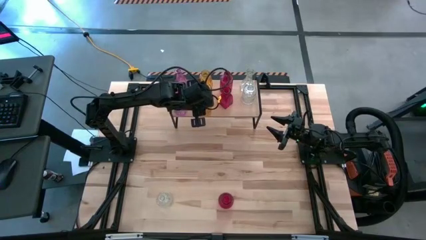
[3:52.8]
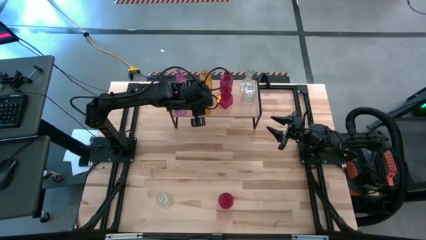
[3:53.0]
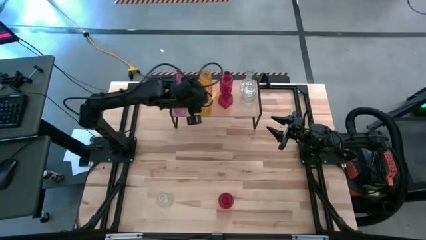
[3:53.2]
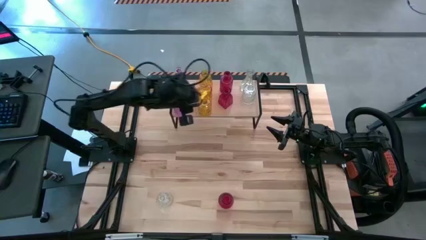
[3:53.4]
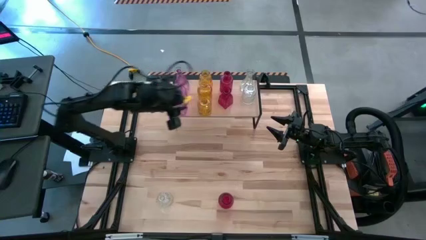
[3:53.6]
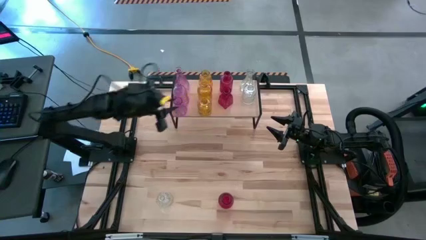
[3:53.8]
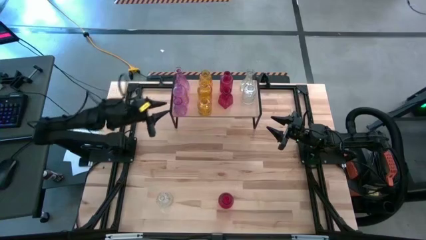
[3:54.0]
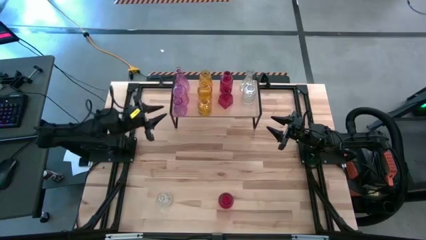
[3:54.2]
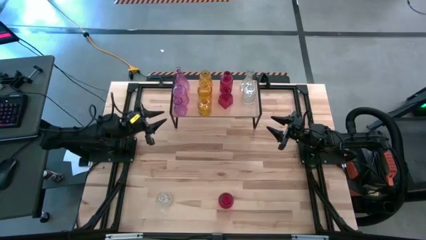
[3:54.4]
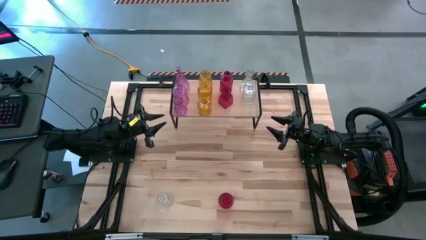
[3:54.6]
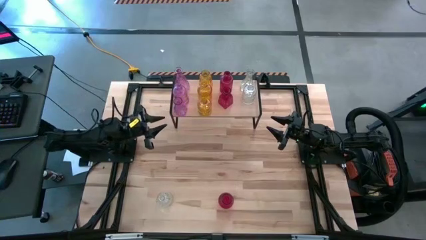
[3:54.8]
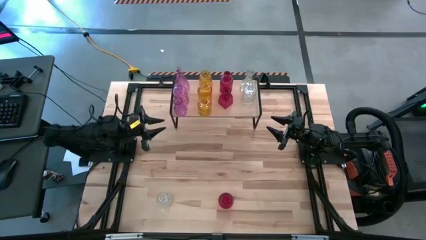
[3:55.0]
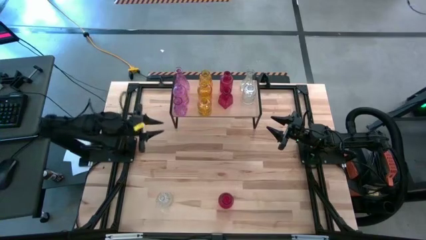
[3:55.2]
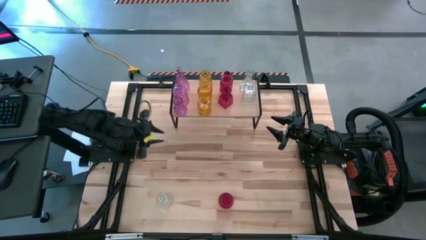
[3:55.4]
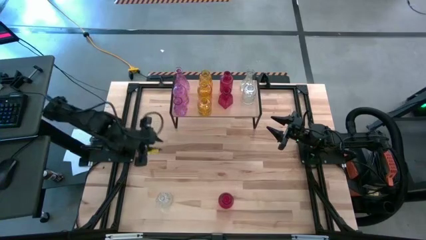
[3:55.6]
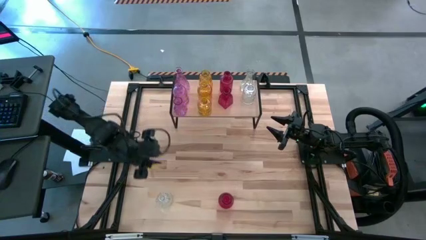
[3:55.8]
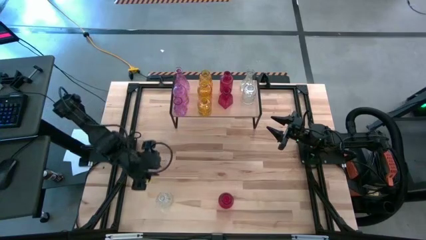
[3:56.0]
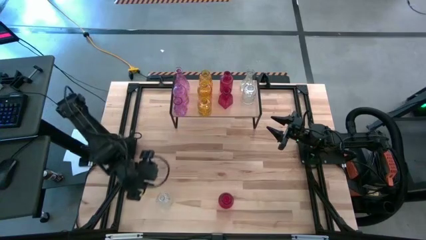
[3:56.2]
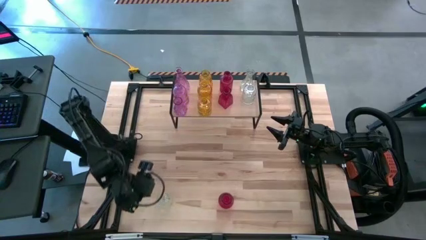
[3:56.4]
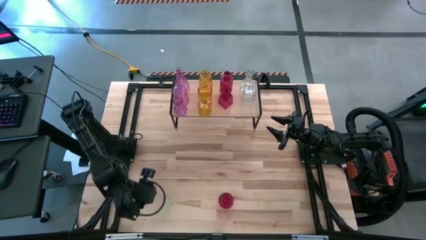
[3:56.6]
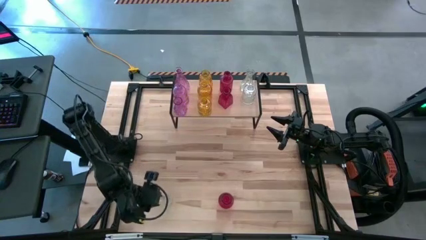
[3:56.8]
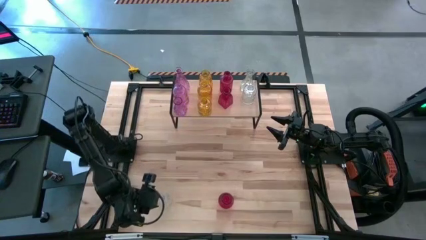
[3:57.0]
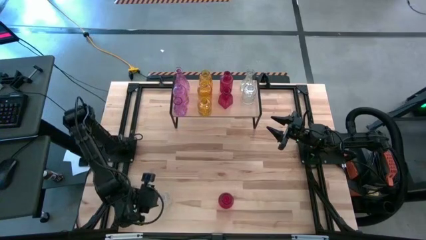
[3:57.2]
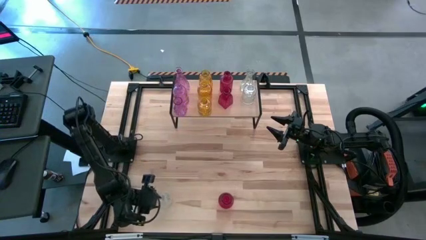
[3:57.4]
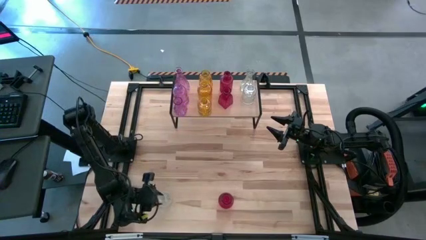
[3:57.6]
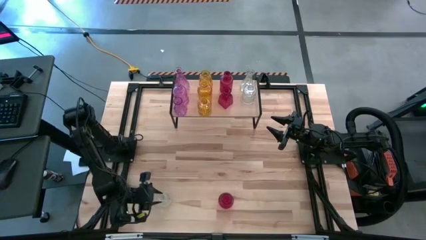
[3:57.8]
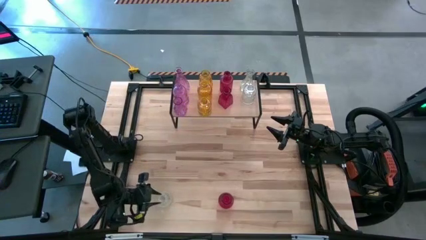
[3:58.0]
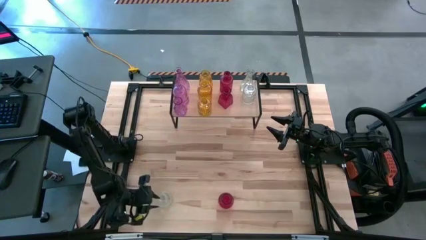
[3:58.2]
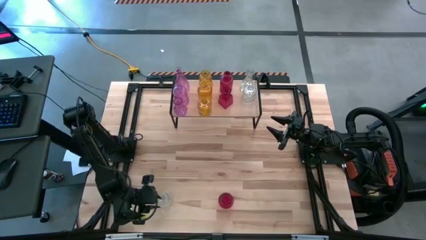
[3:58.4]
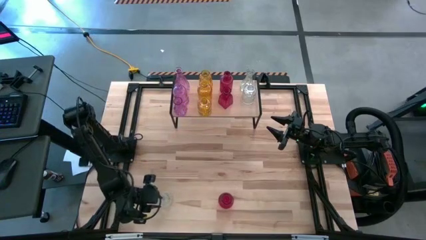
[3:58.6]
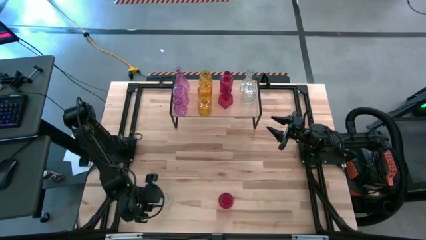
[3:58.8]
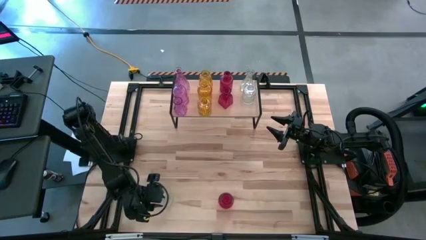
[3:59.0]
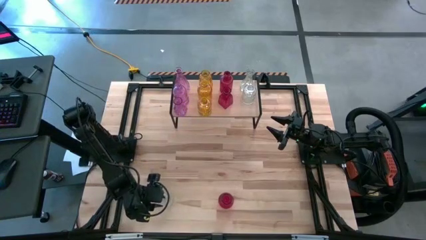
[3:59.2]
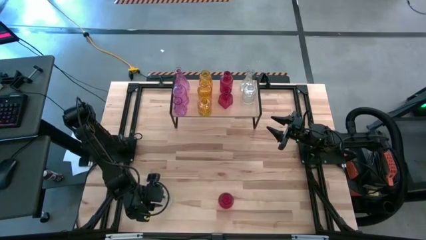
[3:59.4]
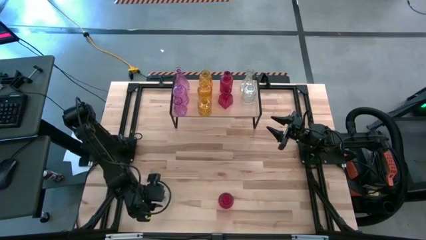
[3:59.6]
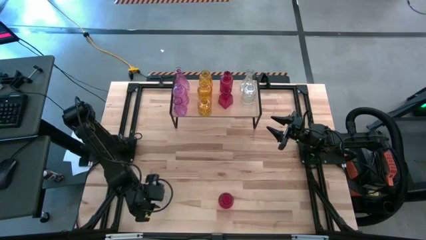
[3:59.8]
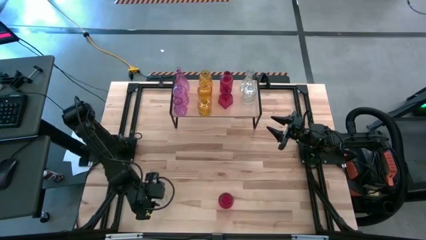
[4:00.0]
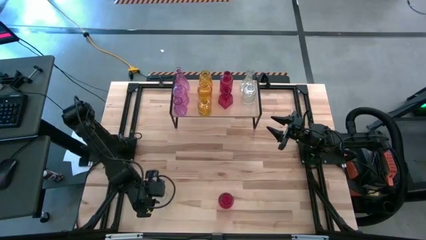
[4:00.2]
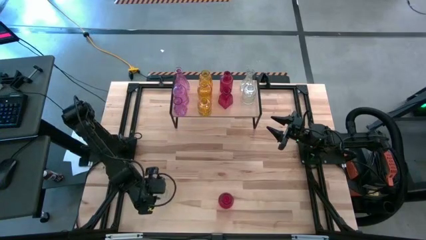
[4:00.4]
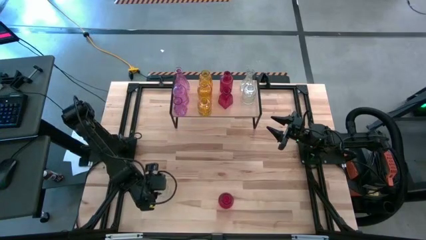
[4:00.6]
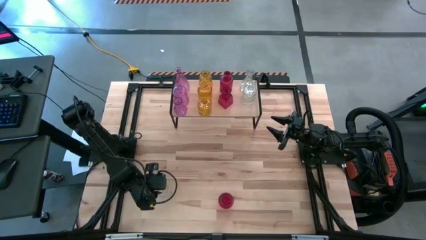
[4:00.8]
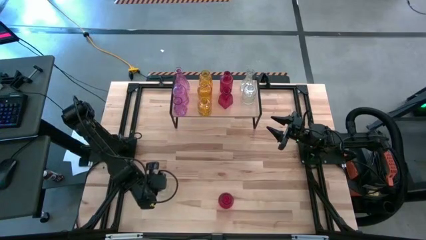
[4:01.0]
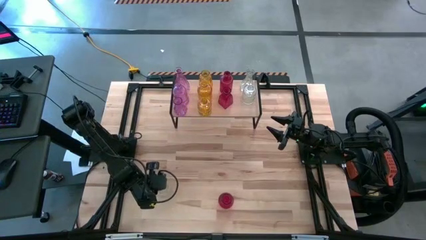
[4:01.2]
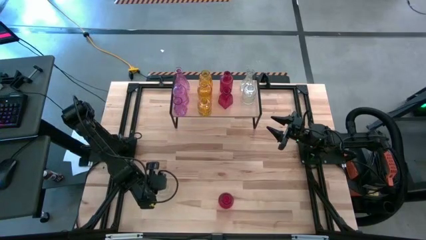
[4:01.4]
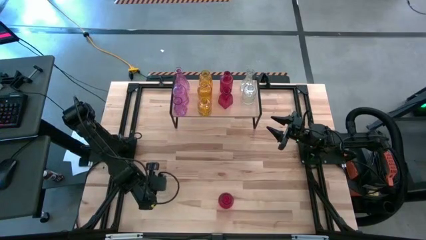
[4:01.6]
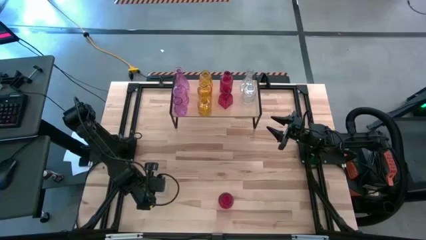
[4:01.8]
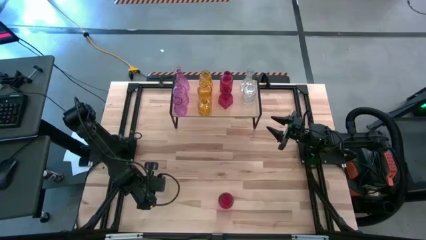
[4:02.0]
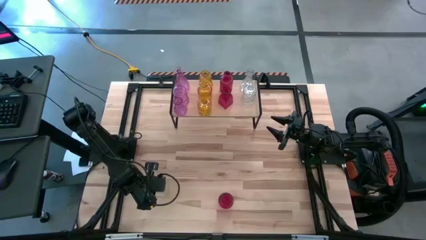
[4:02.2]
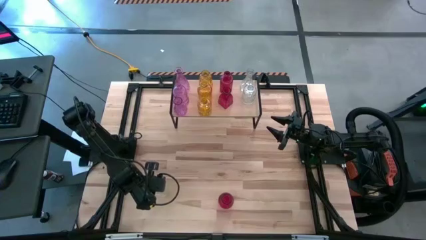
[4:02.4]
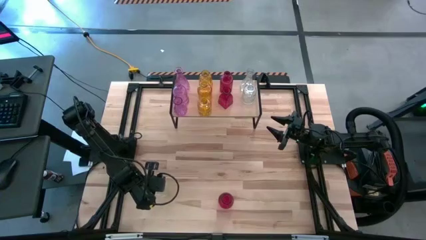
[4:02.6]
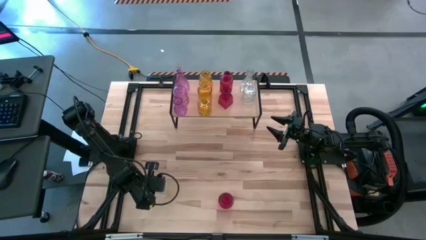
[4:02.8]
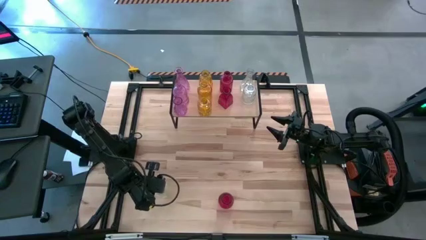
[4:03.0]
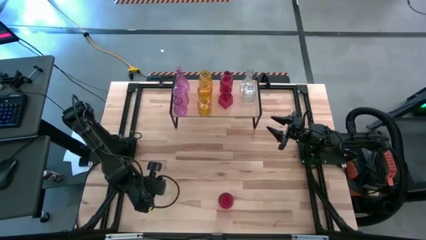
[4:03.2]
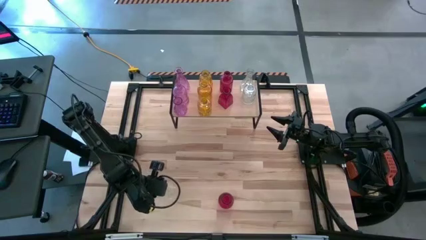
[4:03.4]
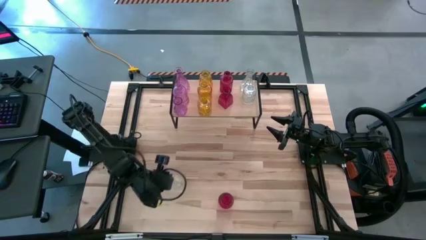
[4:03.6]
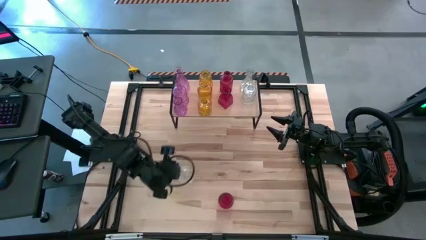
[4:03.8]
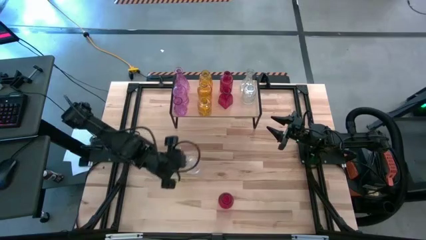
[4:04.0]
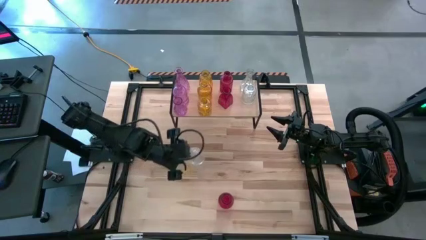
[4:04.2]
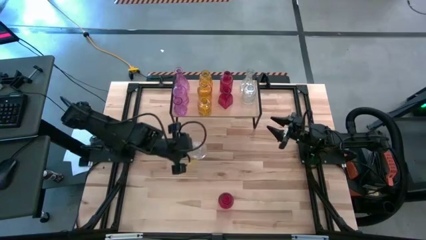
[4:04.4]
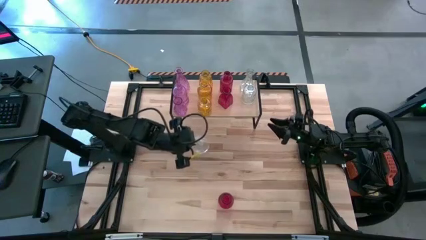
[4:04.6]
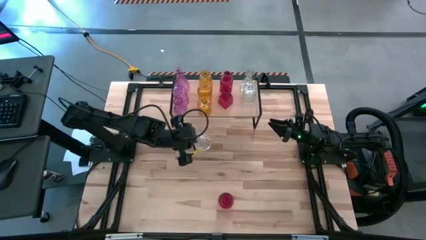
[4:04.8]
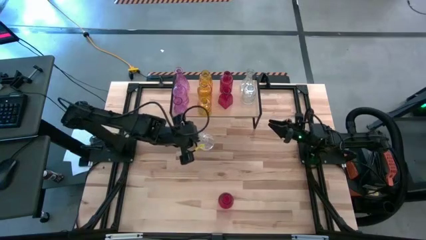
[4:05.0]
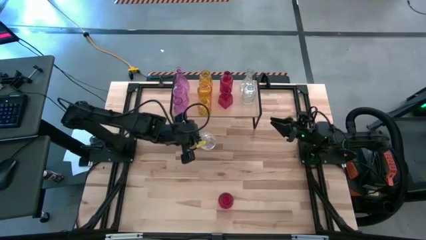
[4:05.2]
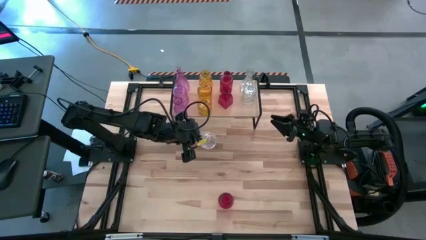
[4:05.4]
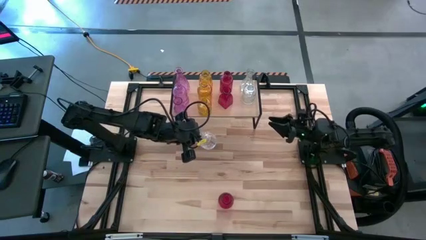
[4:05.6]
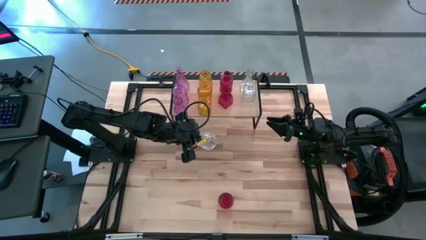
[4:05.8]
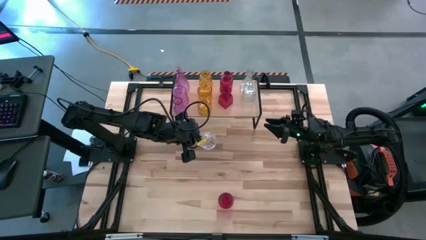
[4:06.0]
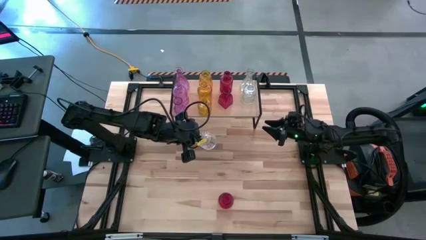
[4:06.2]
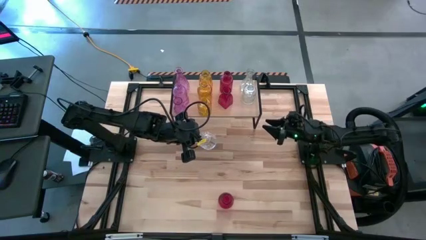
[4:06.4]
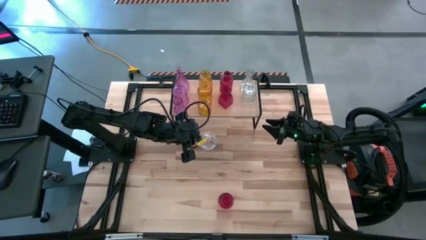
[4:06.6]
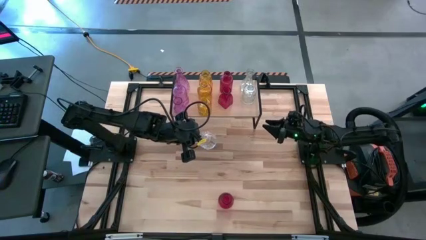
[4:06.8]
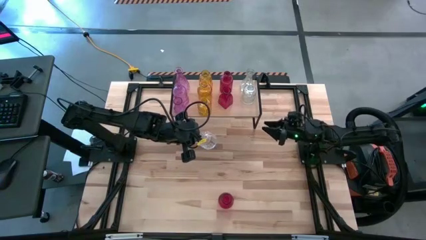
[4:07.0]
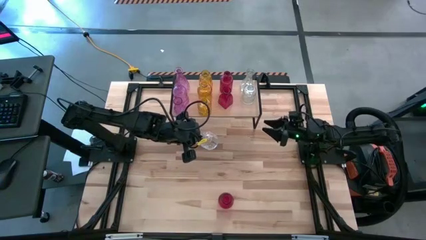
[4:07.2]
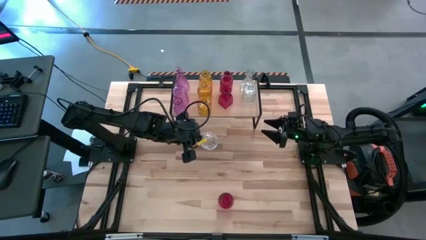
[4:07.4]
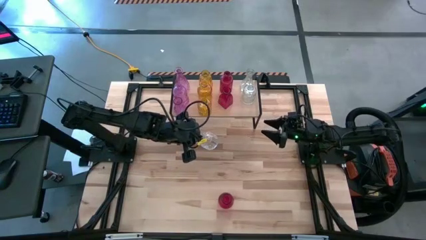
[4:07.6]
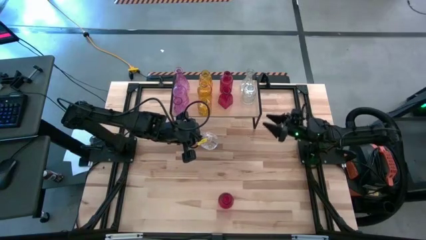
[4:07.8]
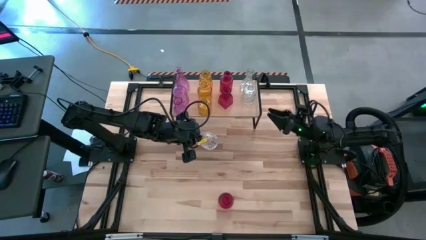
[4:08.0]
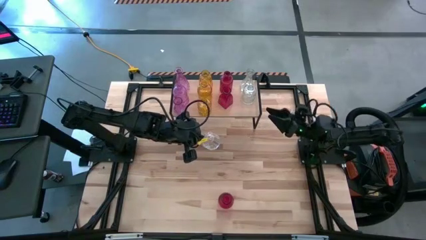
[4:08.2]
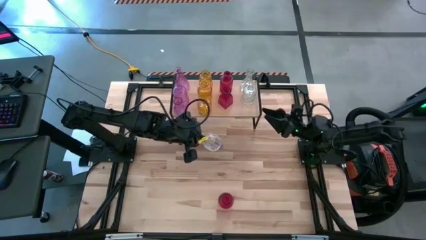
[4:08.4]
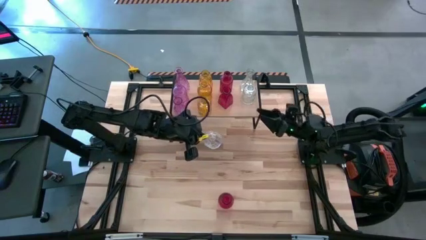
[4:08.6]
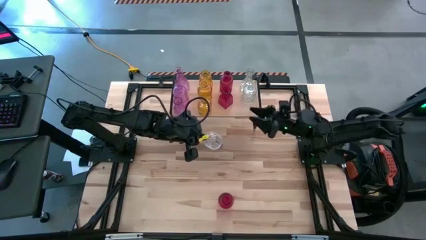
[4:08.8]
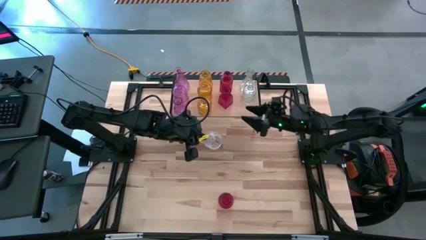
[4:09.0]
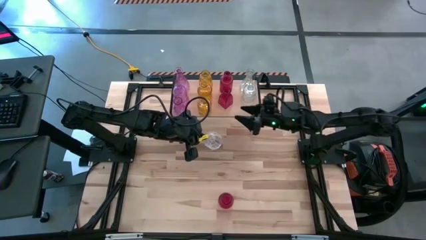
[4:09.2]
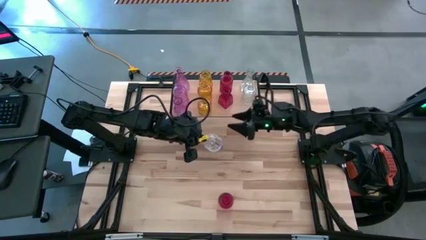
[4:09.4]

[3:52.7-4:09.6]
Task: sort vases onto shelf
Put the transparent vase on the shelf and align it with the other transparent vases

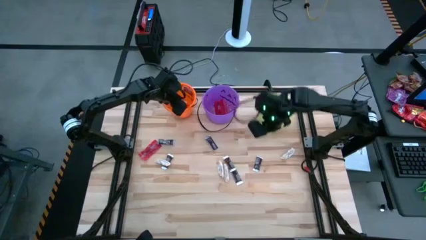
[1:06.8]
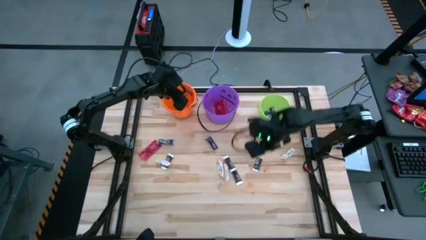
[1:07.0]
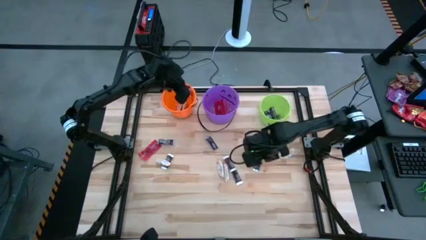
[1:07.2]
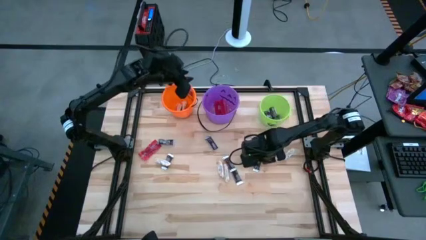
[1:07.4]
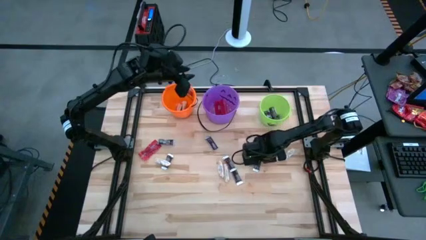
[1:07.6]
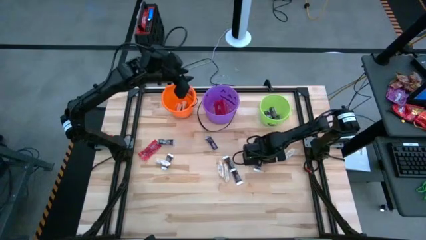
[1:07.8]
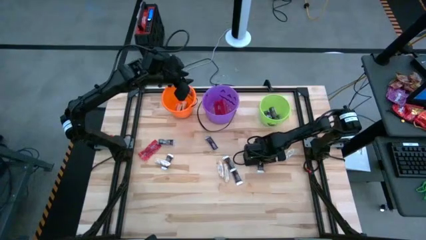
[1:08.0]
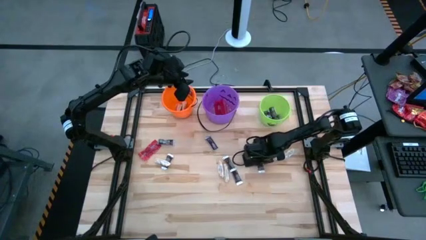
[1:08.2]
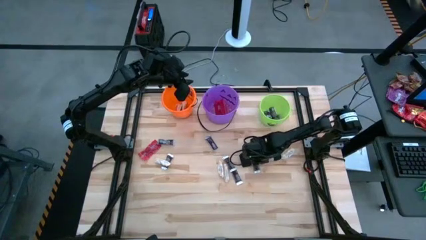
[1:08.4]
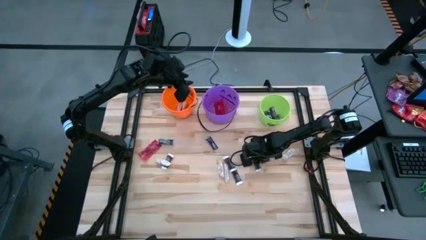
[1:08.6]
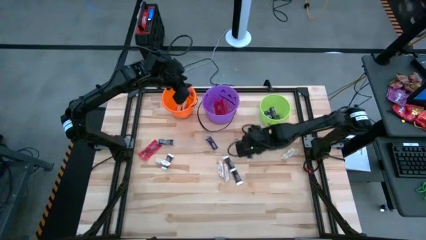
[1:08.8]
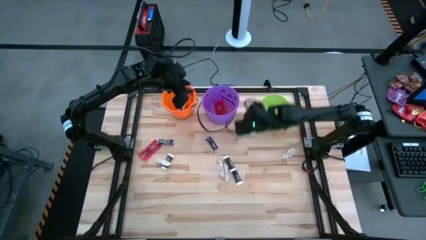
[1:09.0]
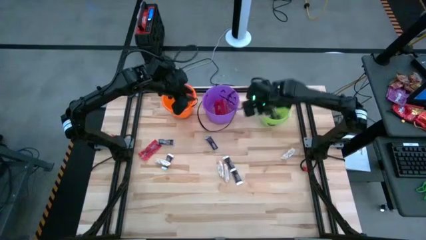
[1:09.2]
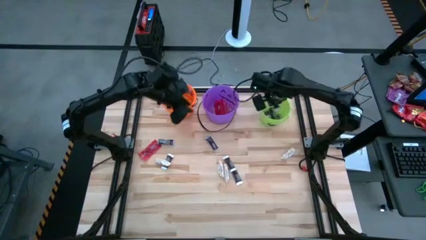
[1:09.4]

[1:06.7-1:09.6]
Task: Sort candy by brand, put in halloween buckets
Put the brown chocolate bar into the green bucket
